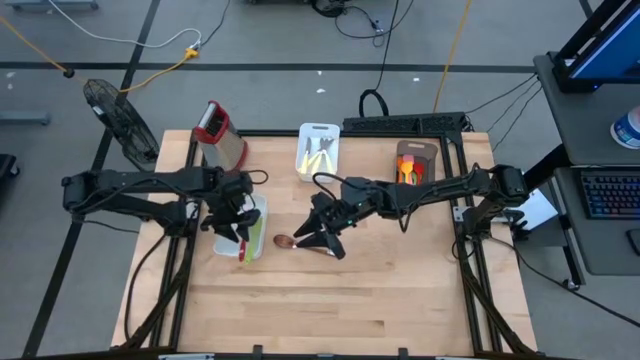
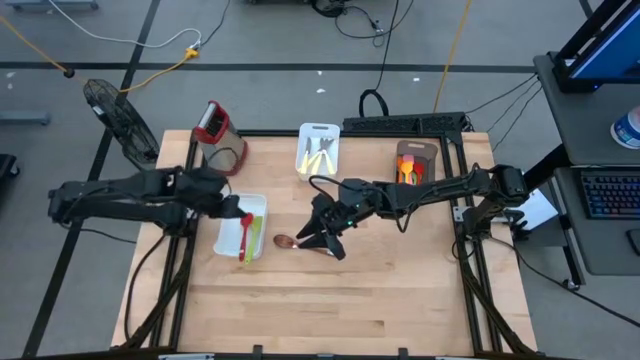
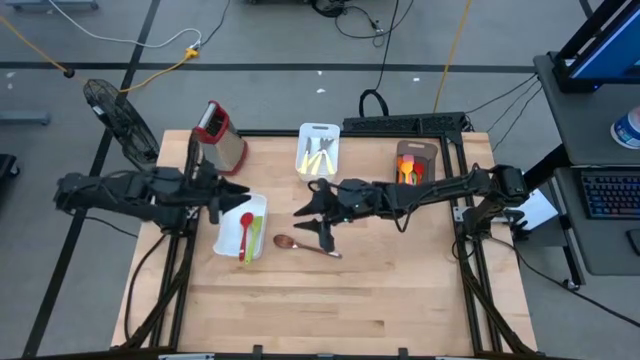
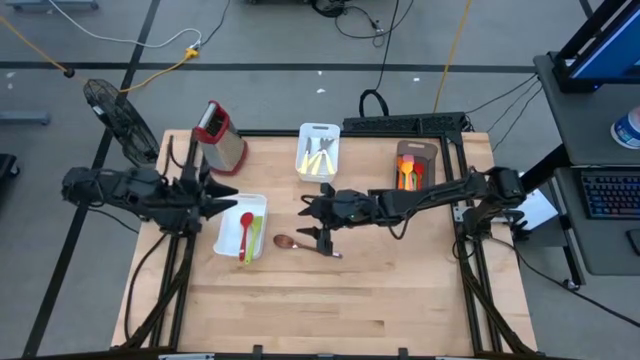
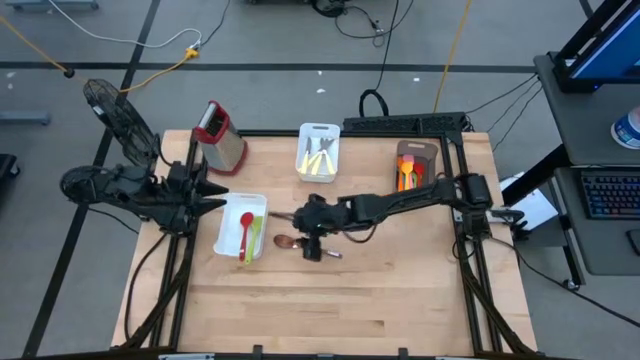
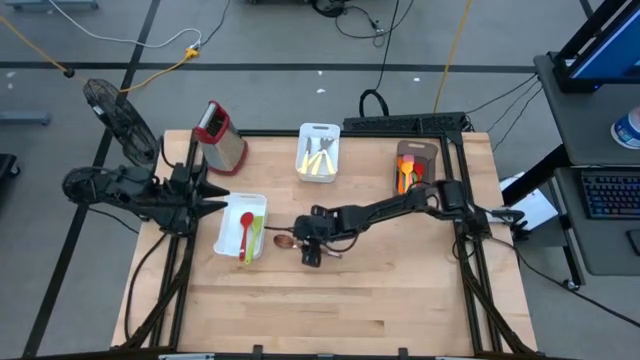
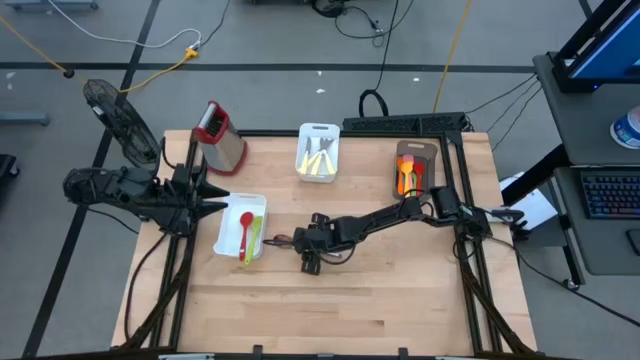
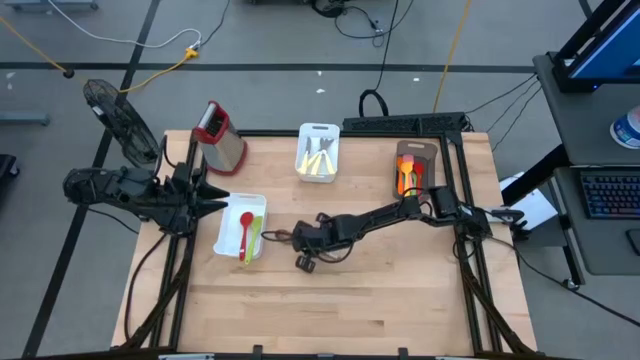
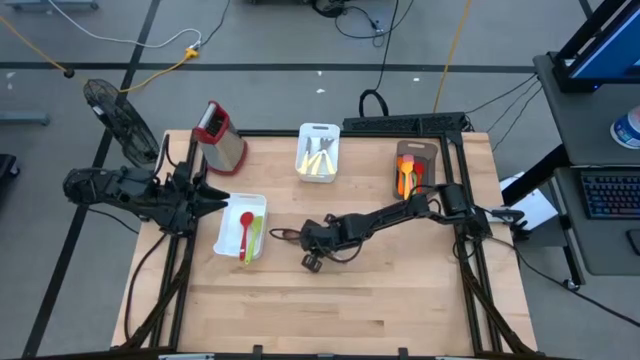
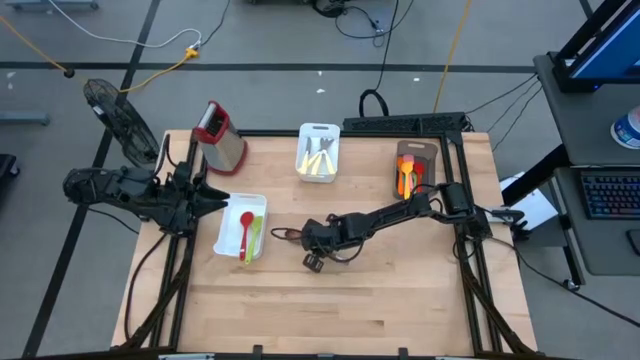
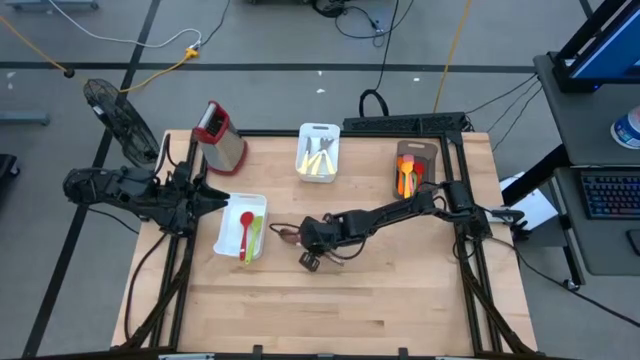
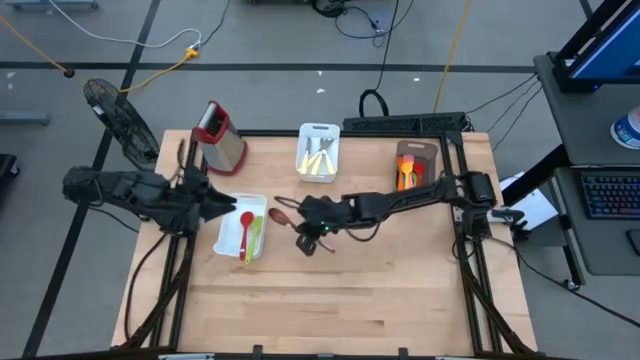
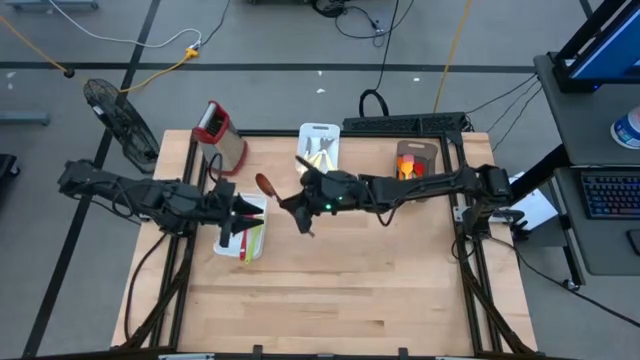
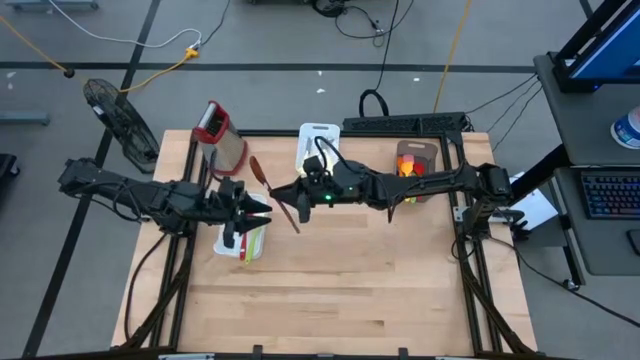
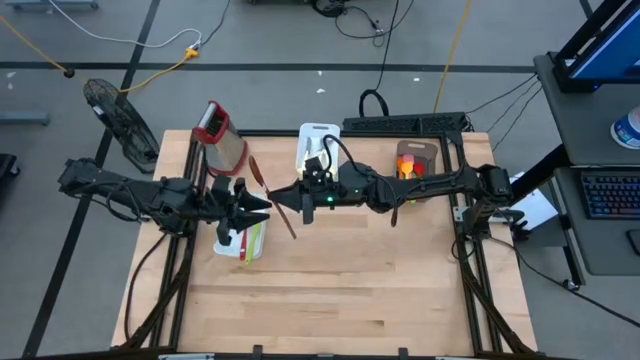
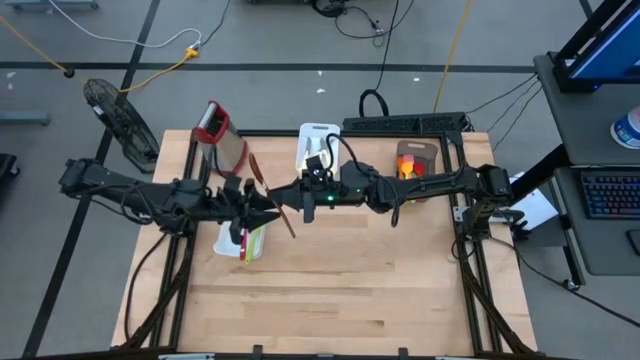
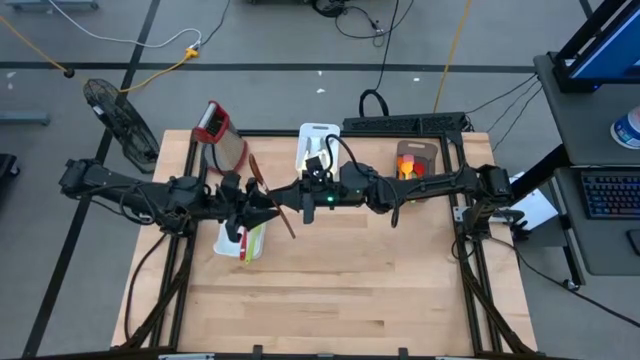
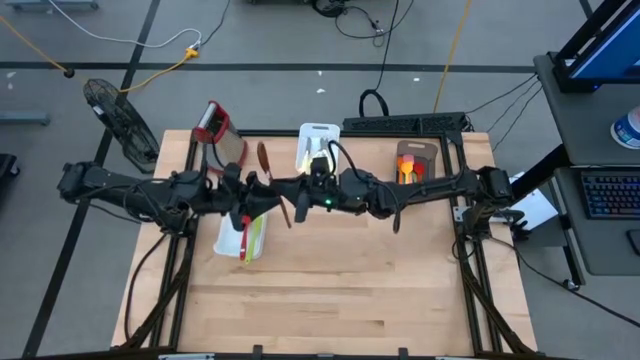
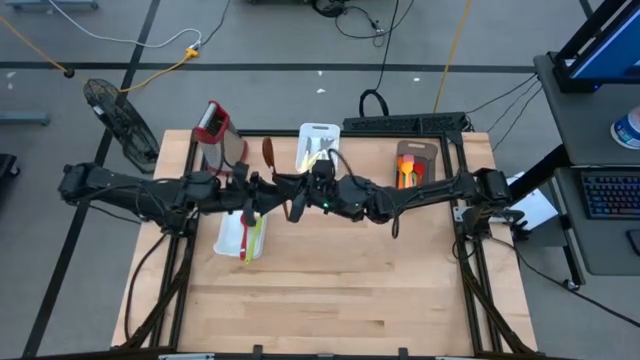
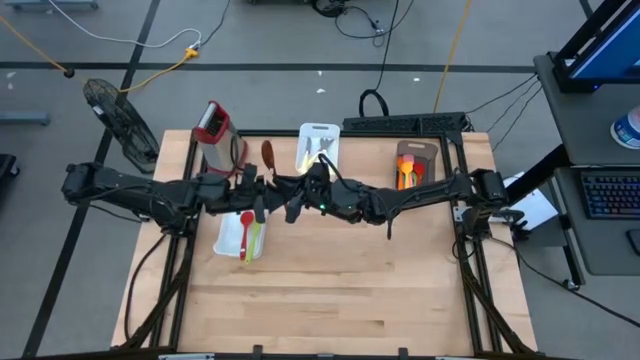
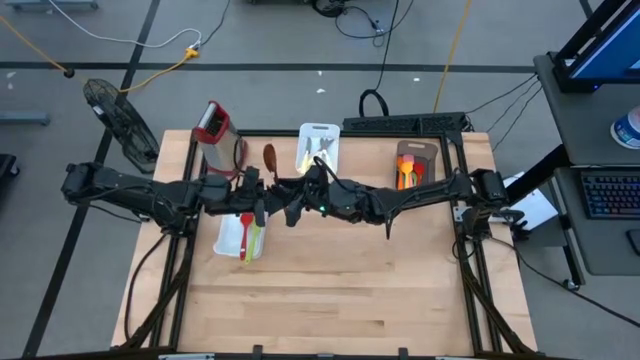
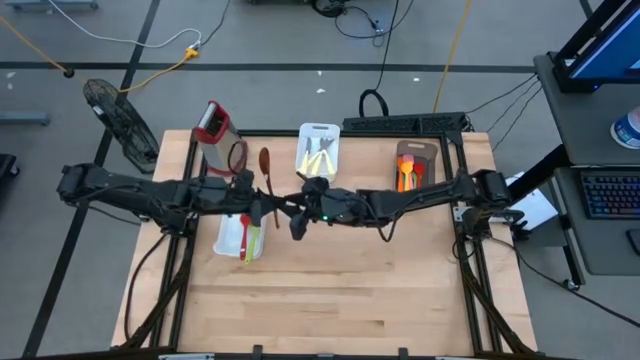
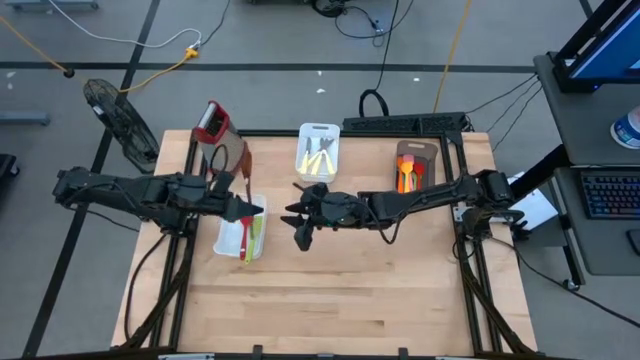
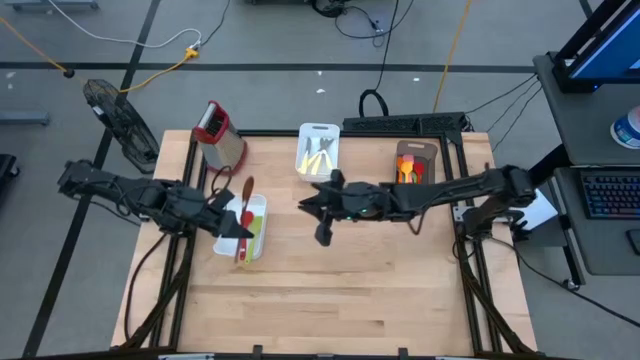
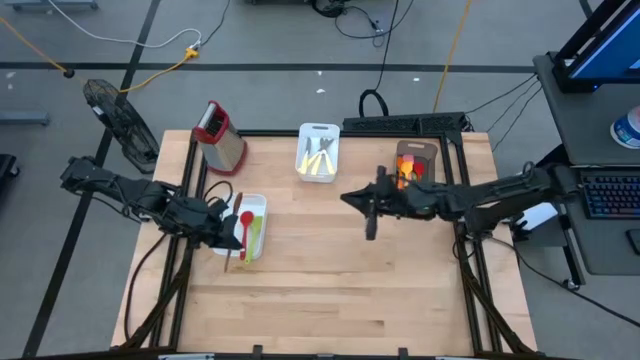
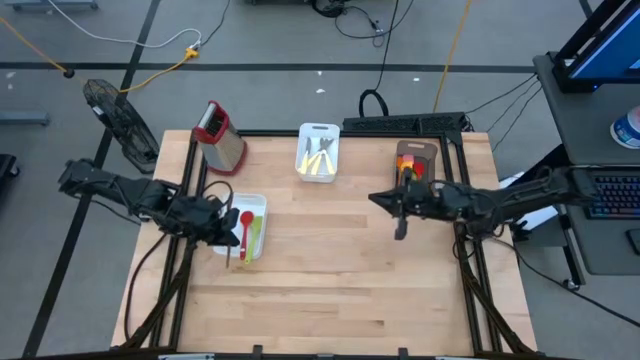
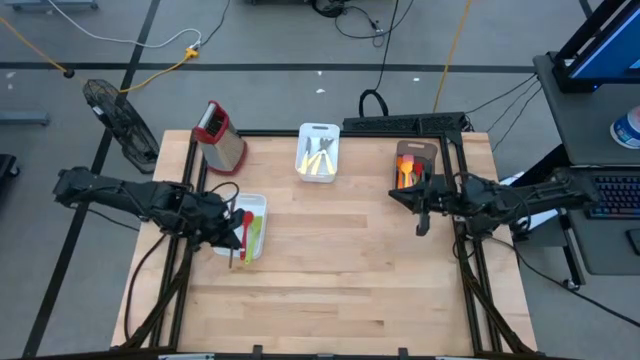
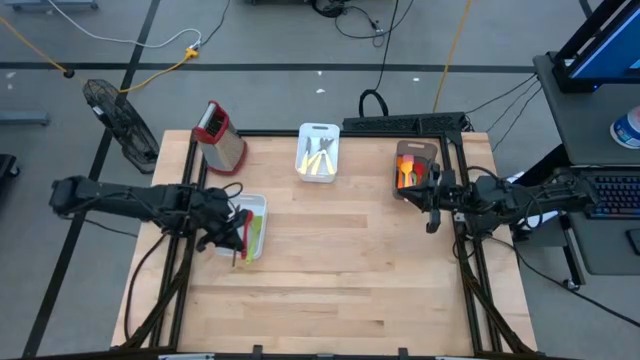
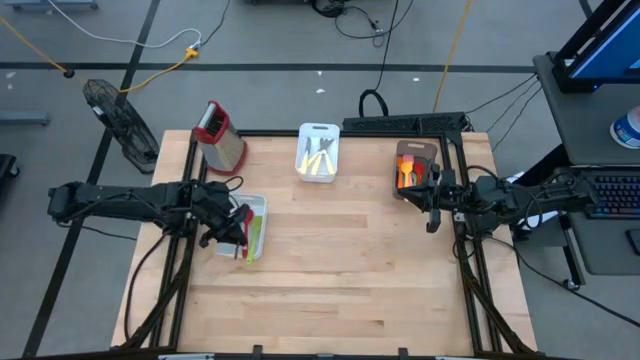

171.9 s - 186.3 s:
Task: Pick & Place Kitchen Items
Put the brown serving spoon into the bottom white bin

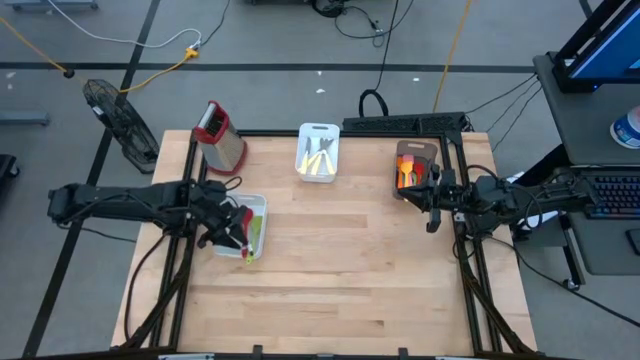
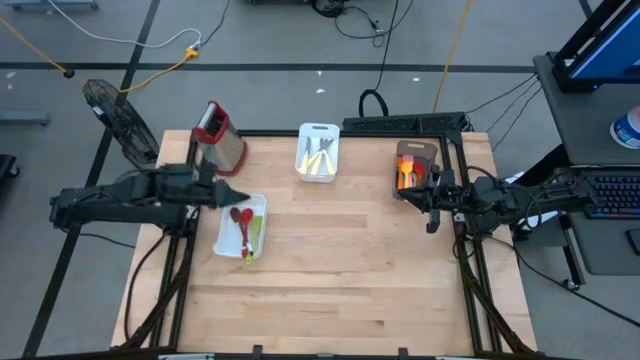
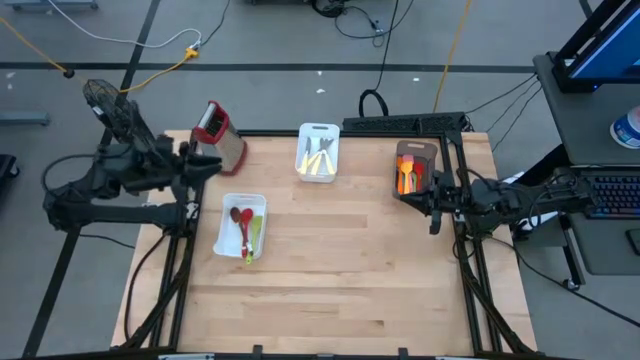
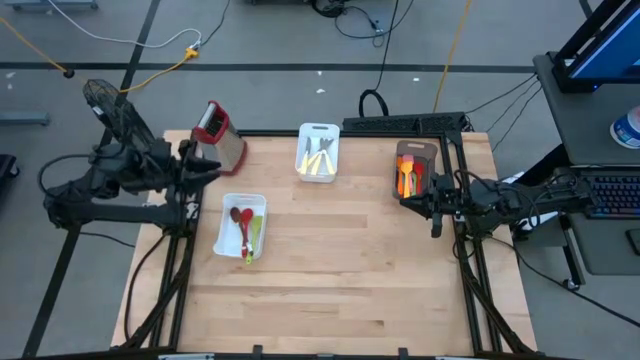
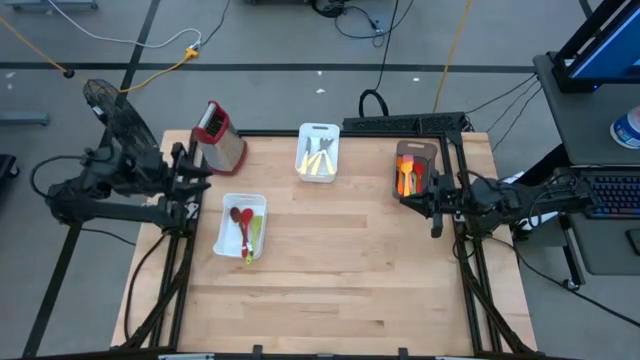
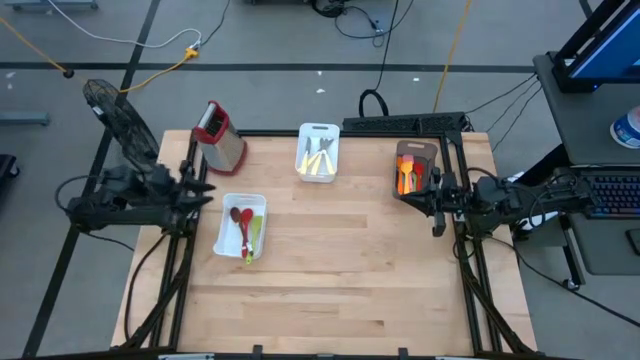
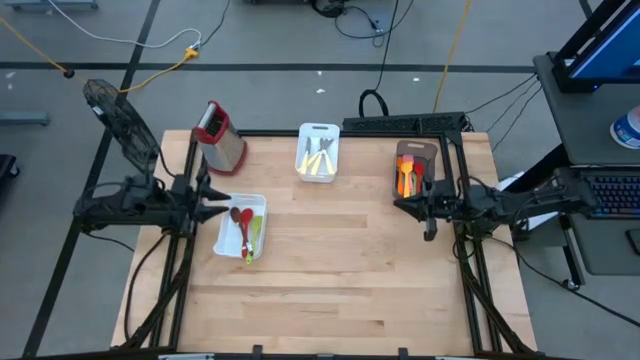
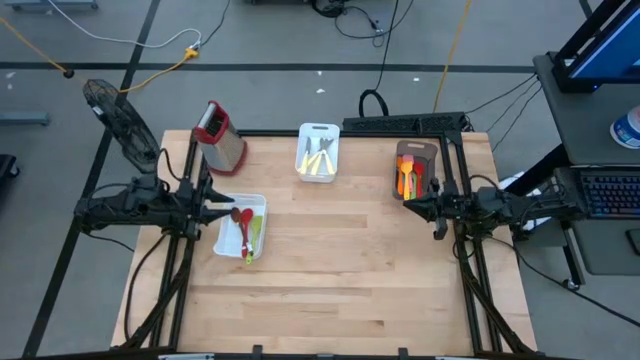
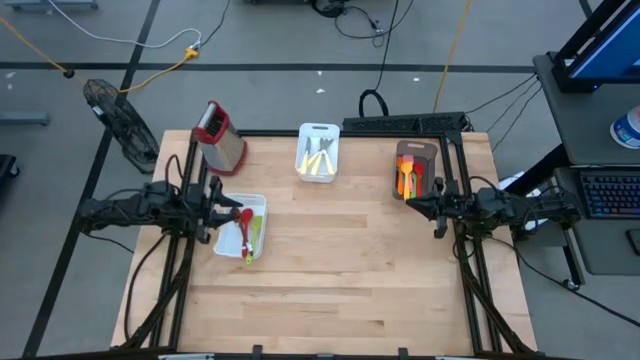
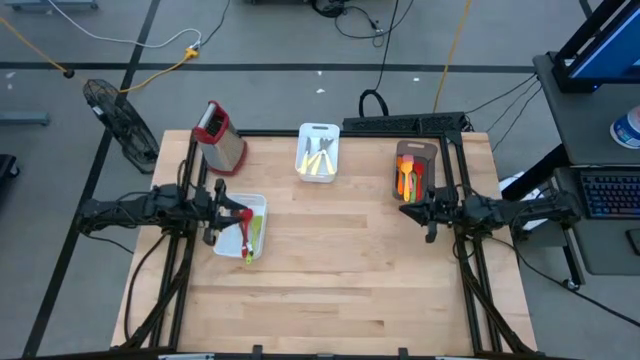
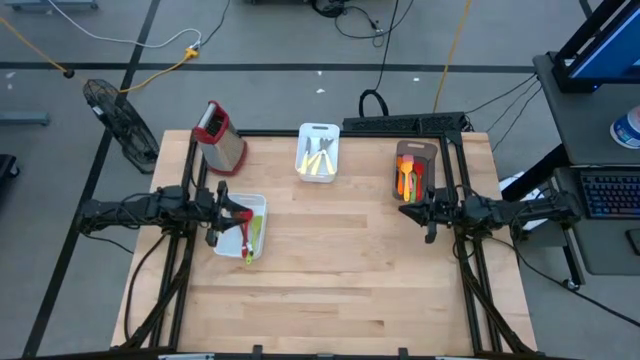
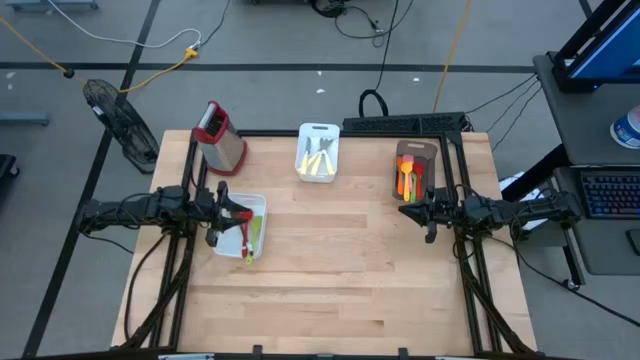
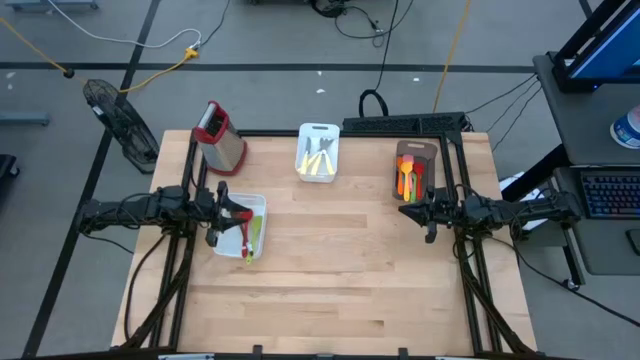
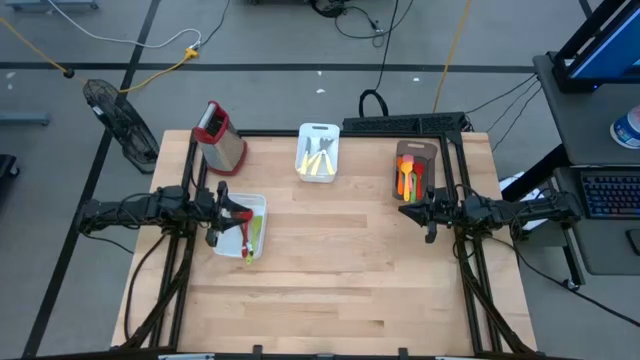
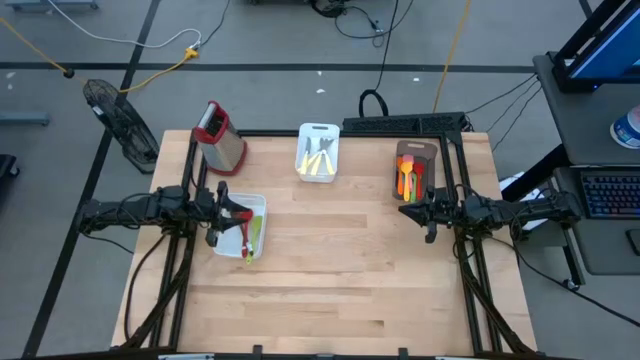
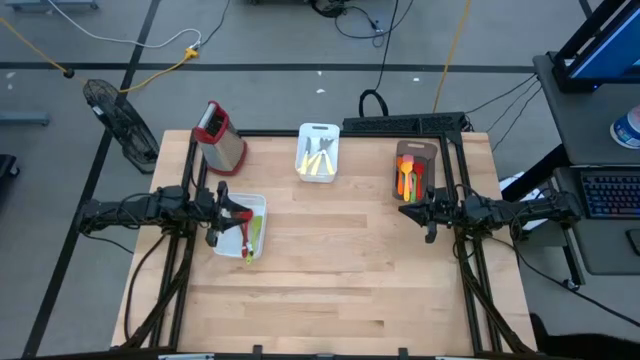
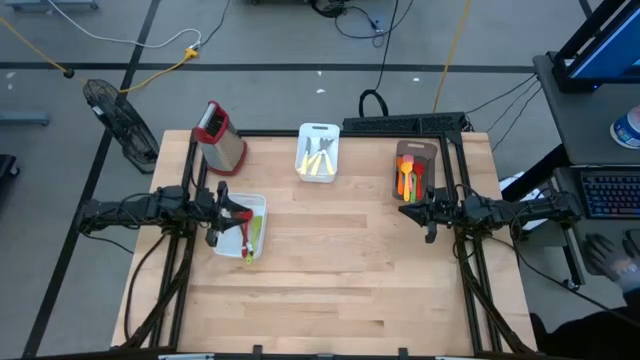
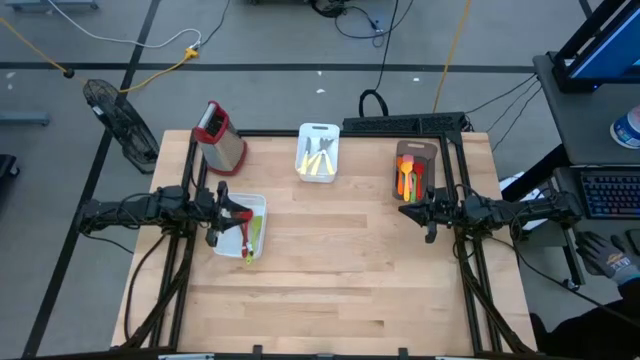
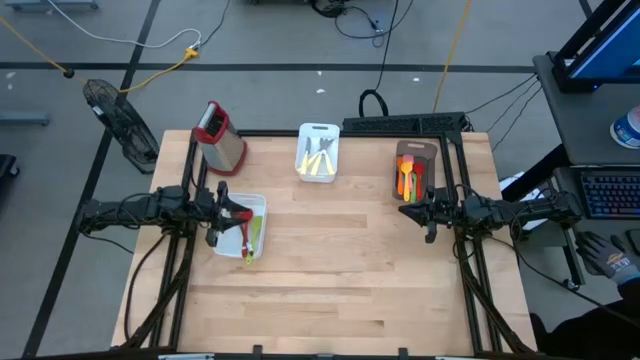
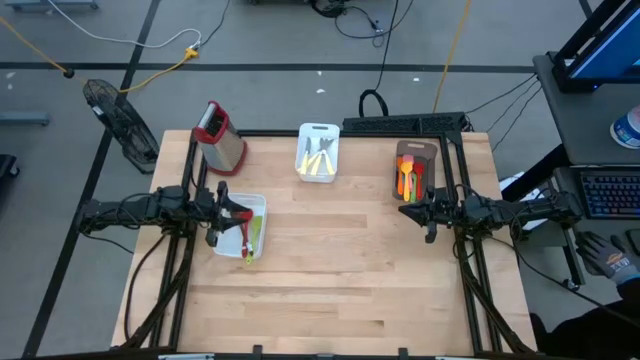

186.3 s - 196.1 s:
Return to Home Position
